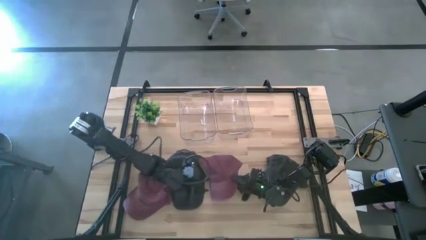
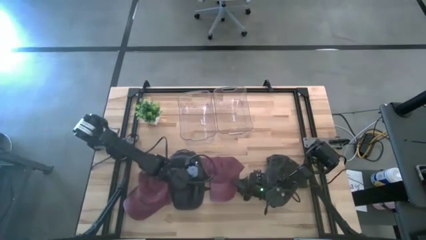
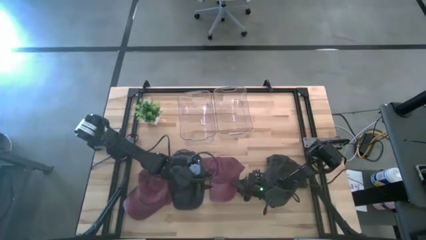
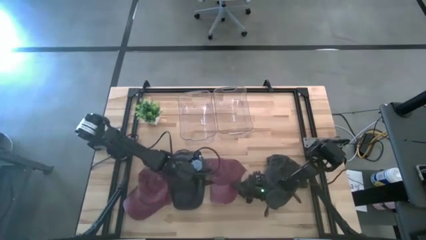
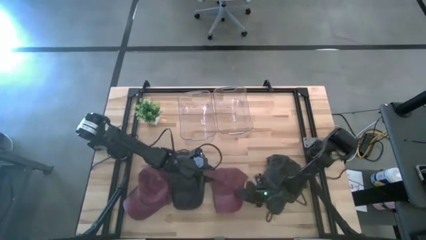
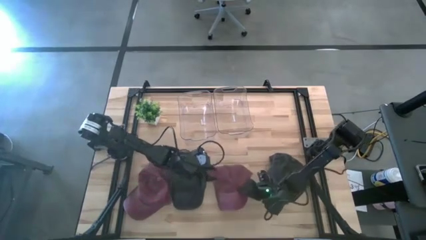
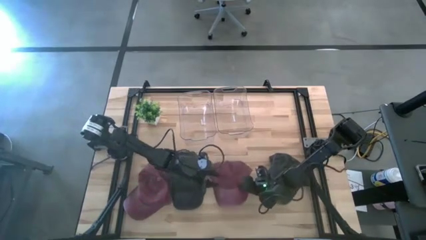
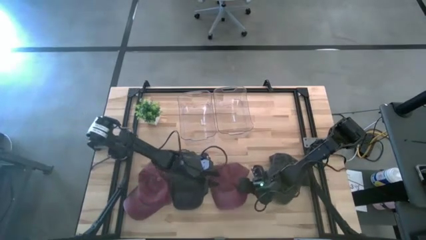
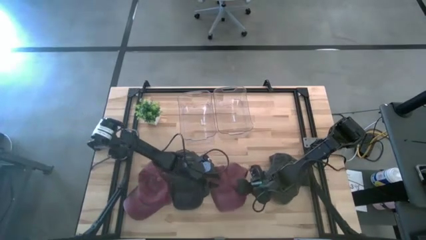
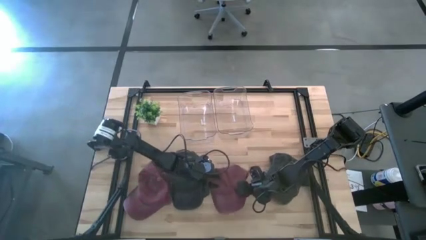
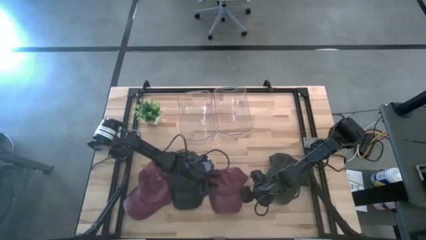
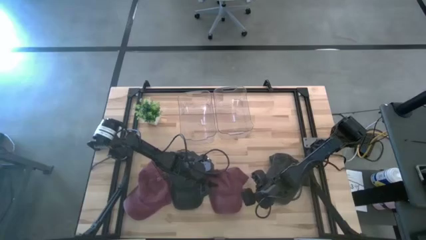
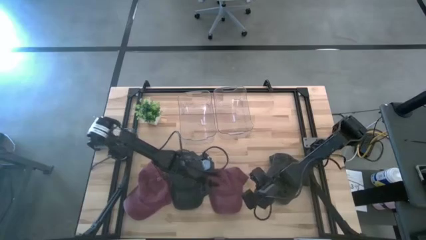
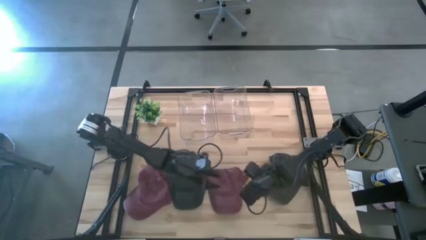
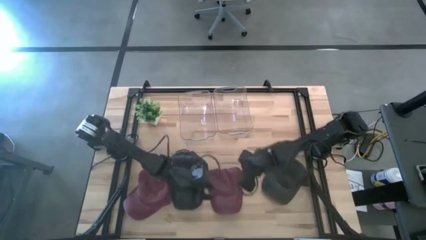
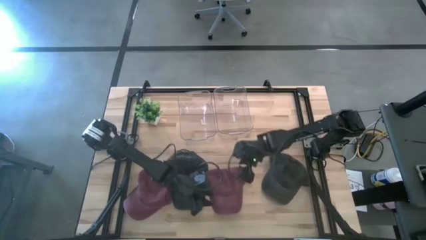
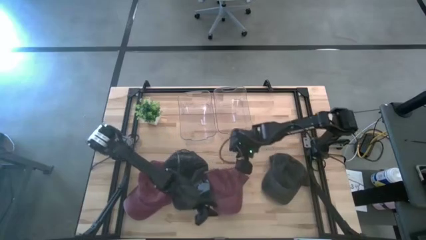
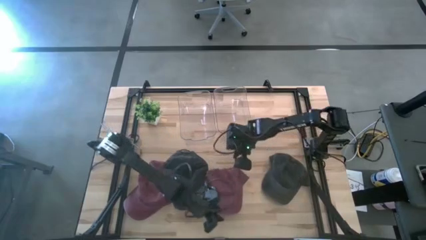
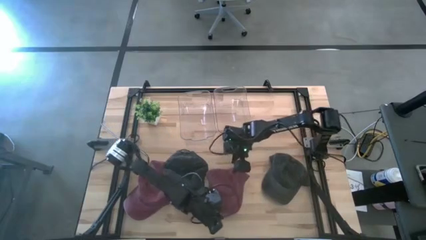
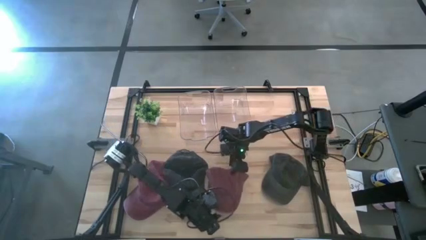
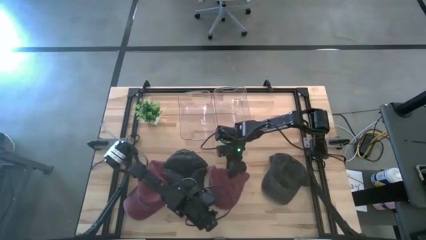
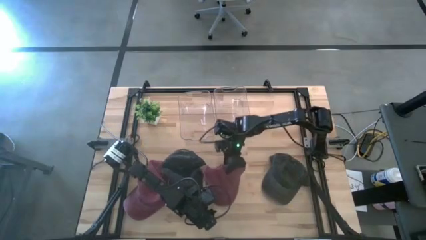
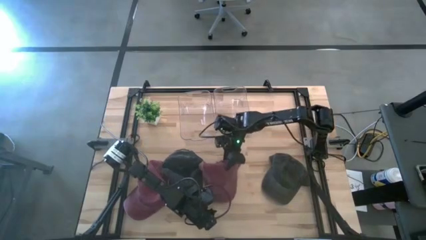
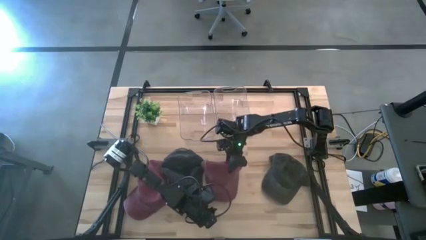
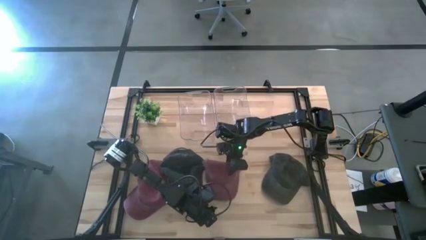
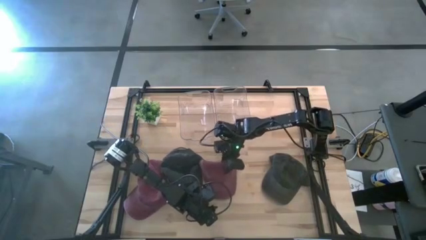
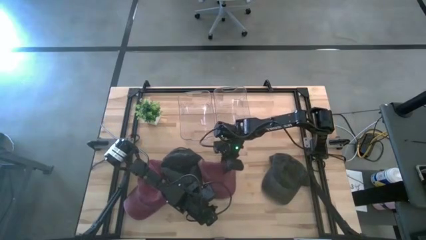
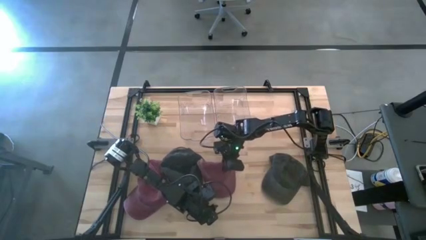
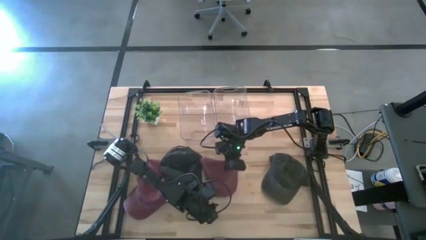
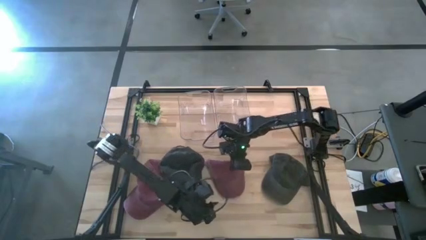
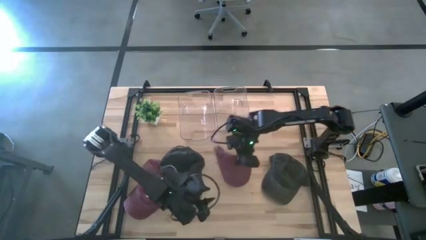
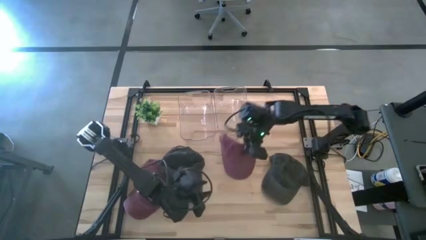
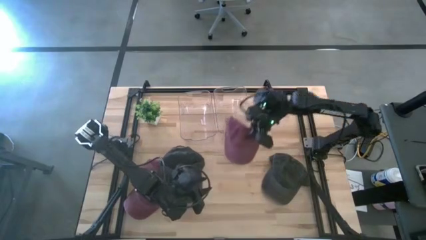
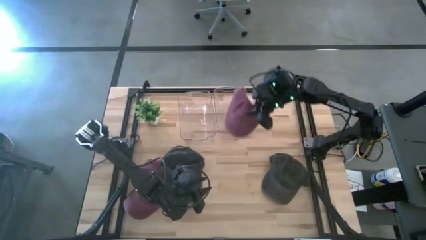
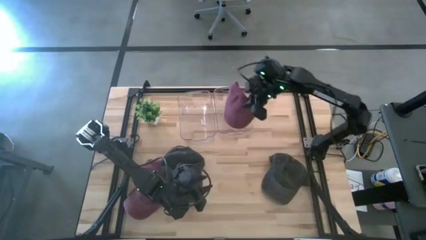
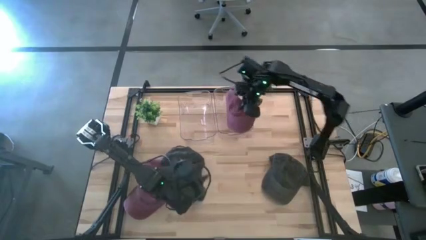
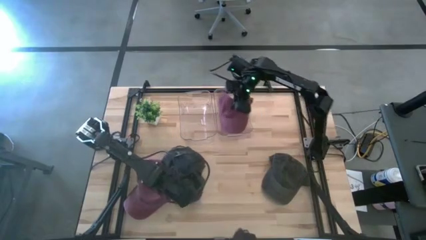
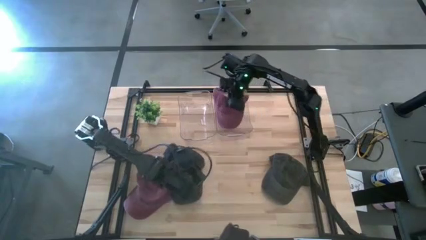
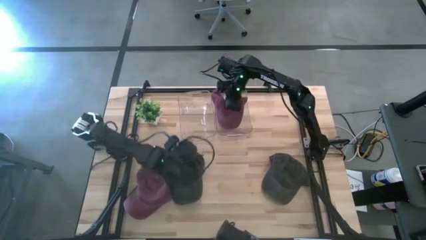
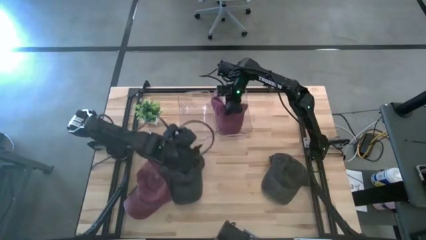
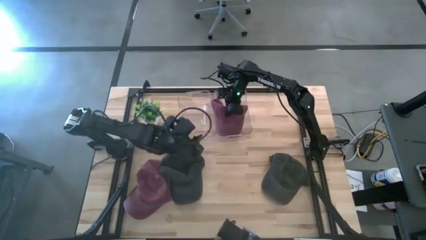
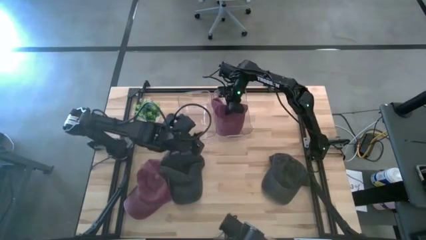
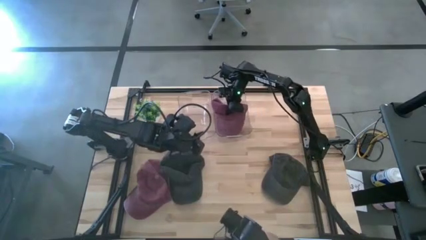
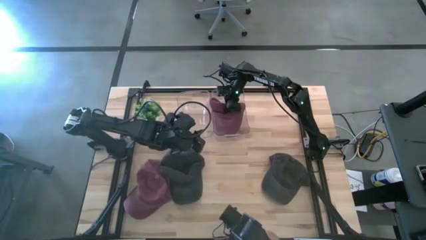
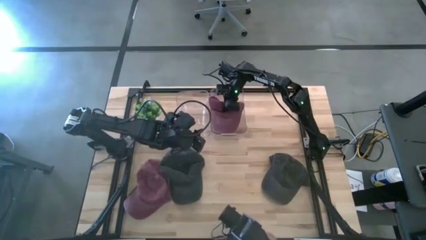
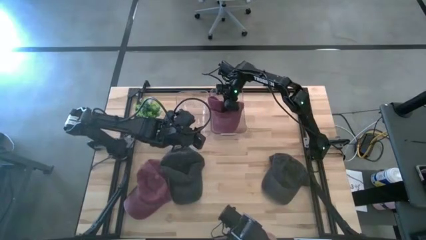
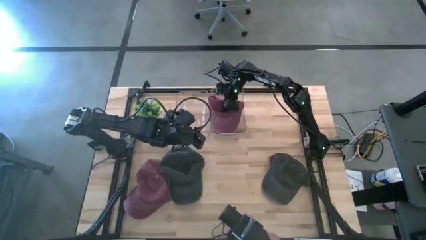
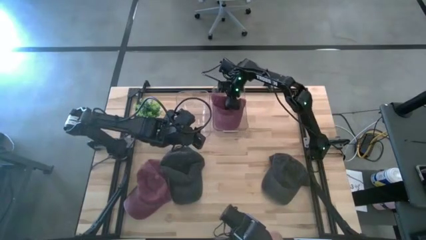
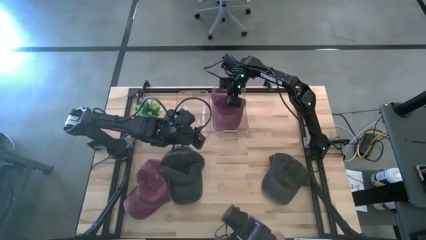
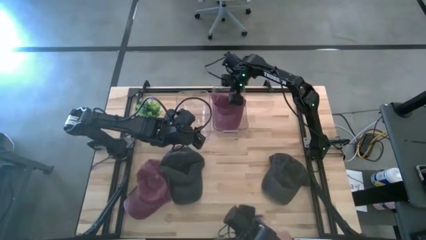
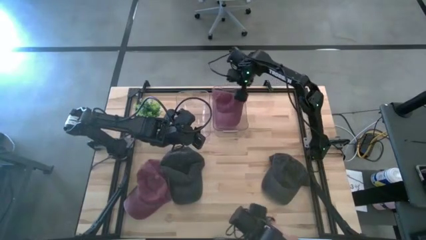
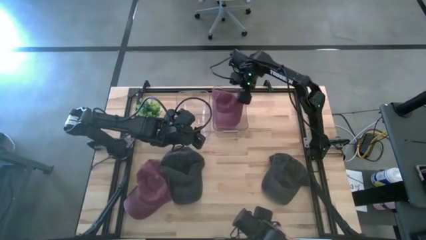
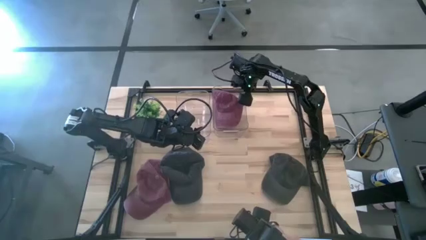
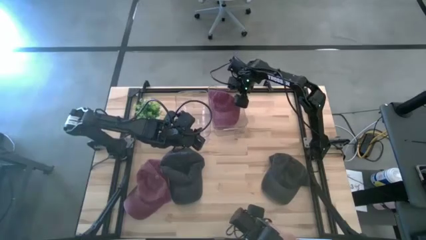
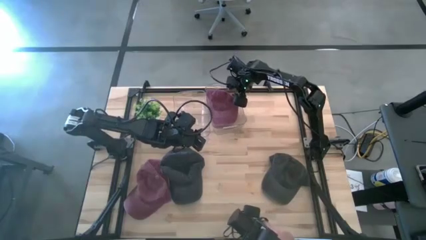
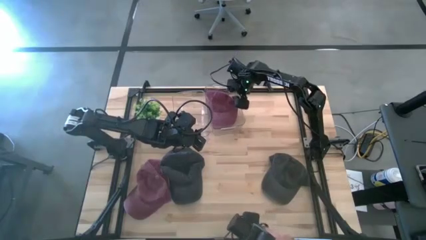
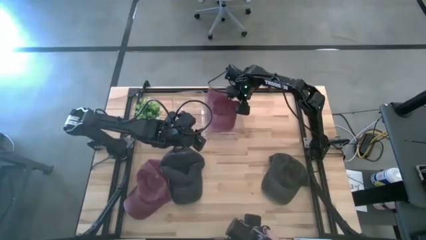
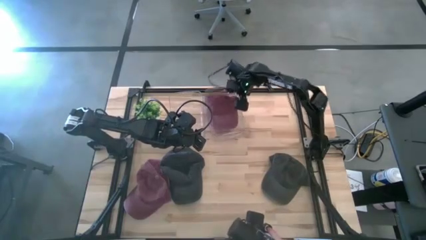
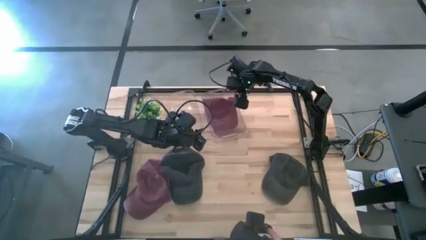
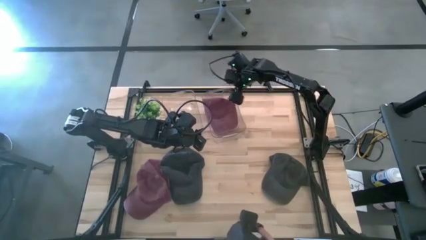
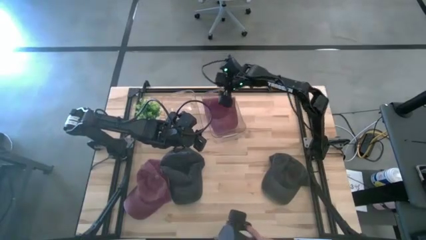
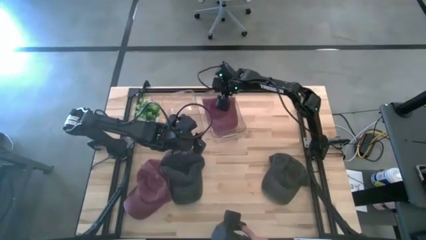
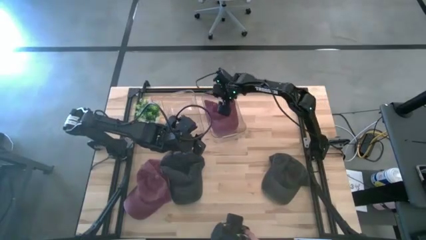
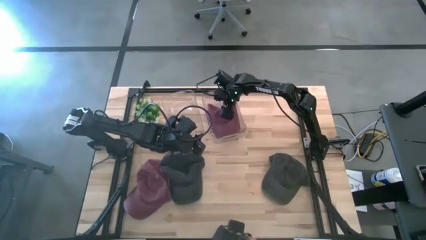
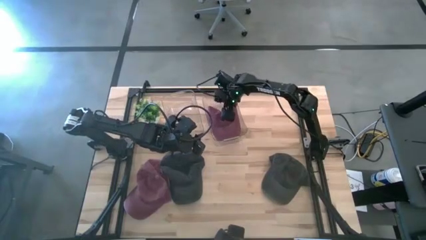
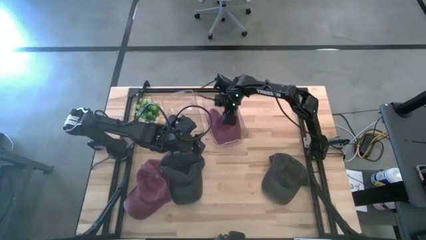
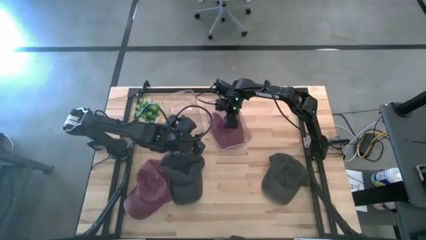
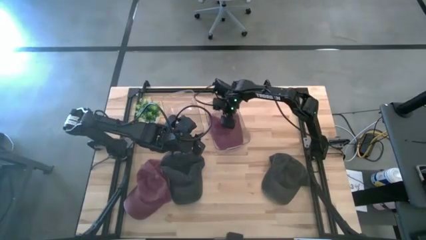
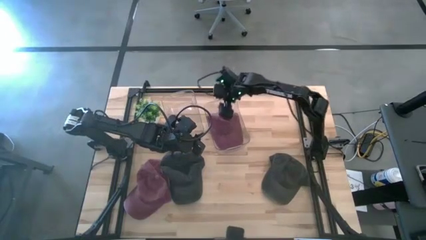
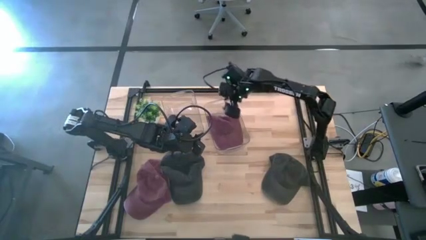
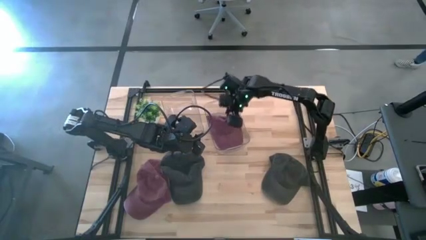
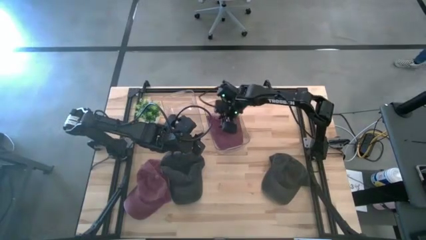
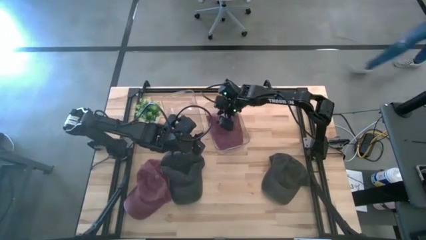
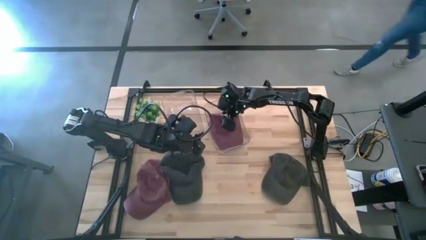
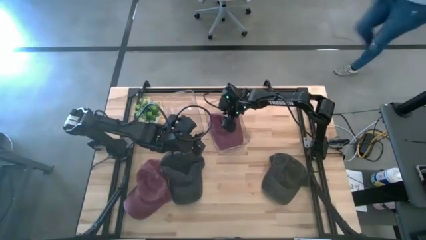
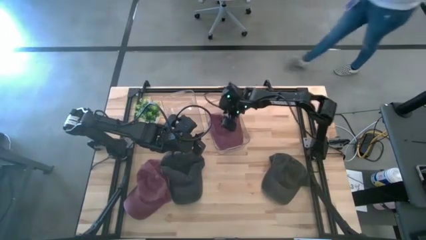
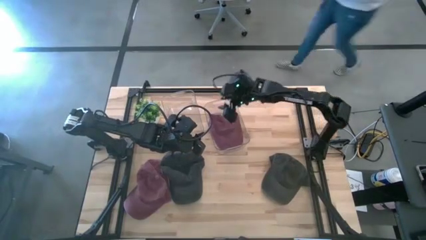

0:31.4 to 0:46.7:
Task: Pick & Place hat
Put the right red cap into the right transparent bin

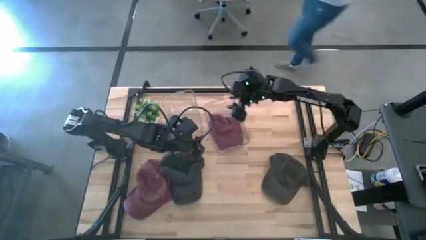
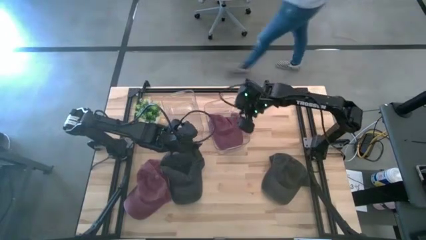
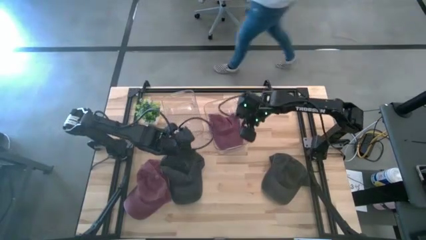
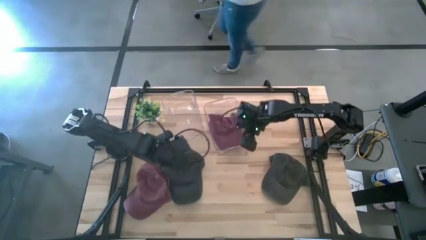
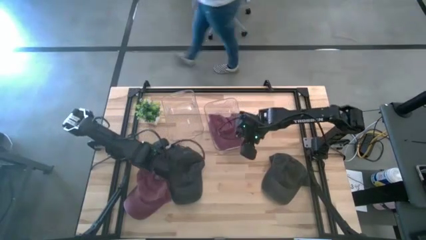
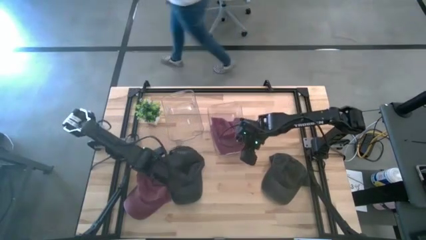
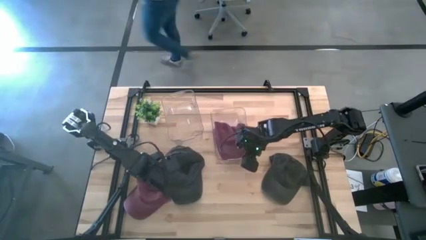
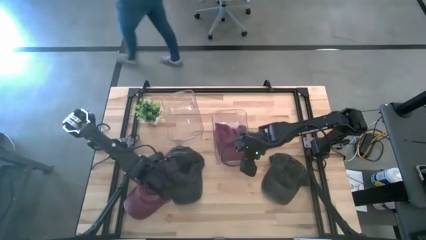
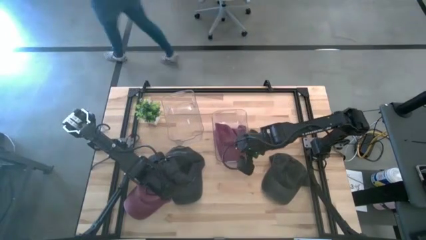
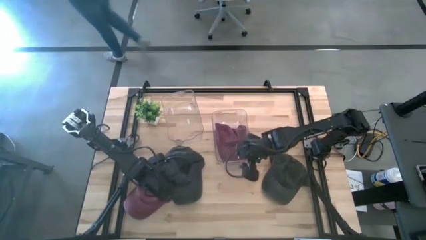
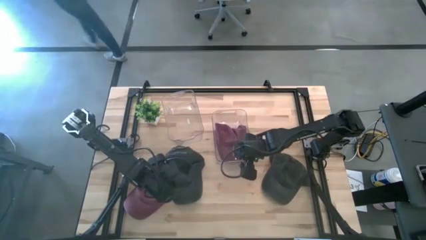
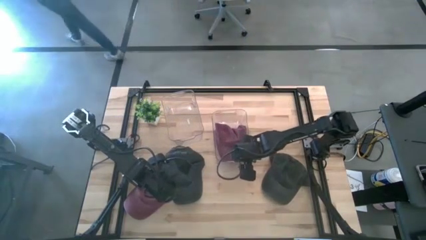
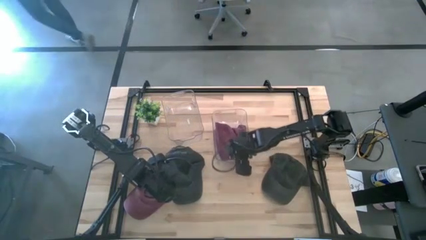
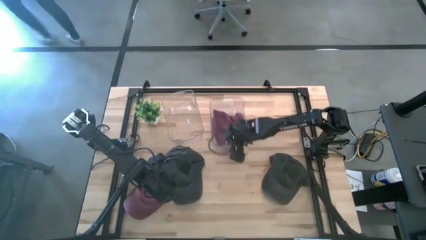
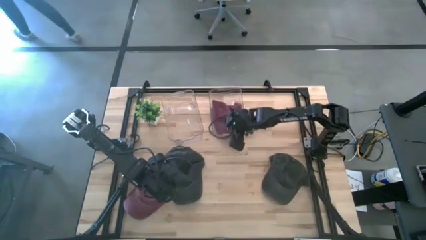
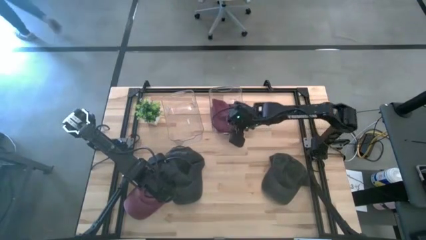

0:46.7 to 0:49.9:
Move the right transparent bin to the top
